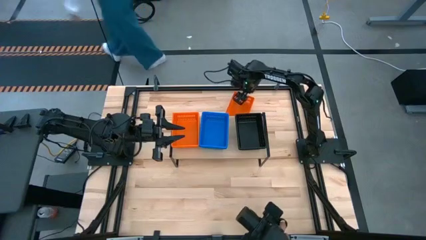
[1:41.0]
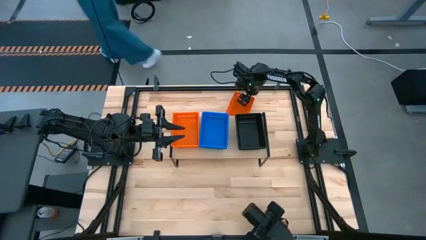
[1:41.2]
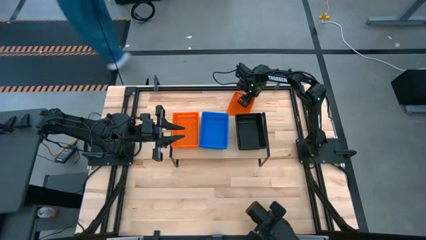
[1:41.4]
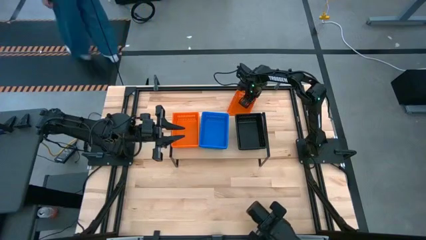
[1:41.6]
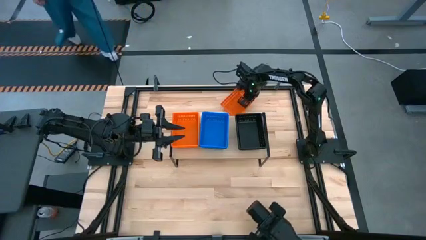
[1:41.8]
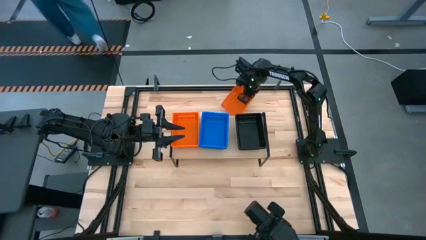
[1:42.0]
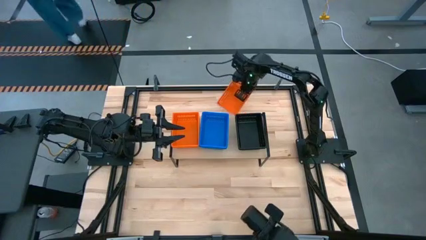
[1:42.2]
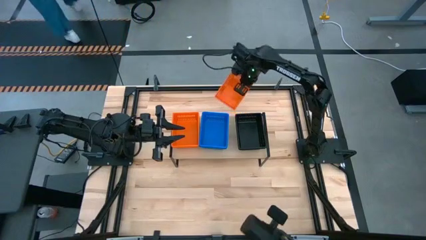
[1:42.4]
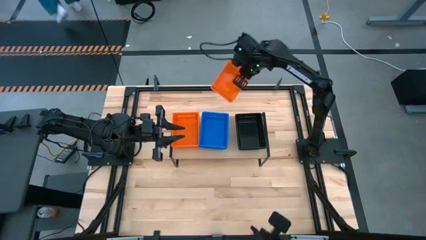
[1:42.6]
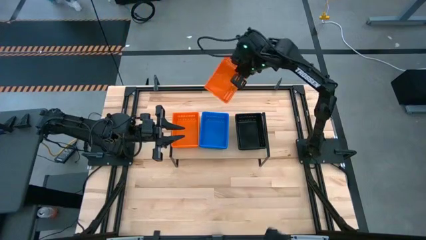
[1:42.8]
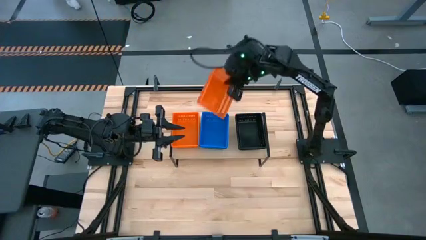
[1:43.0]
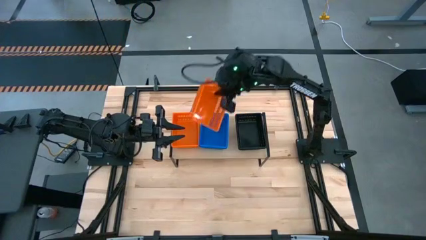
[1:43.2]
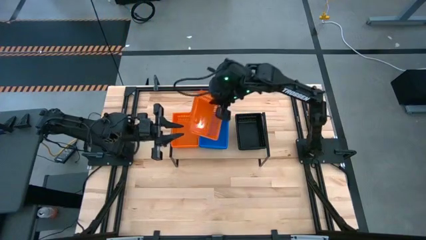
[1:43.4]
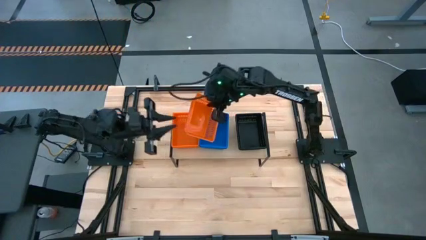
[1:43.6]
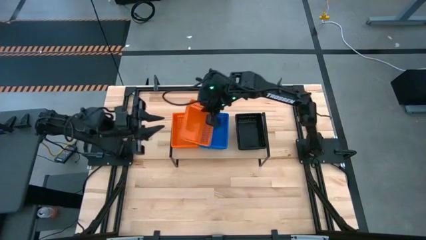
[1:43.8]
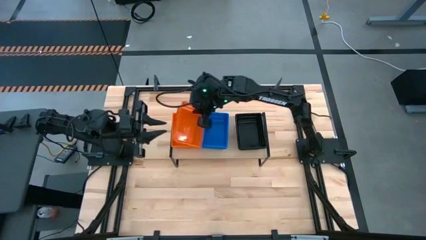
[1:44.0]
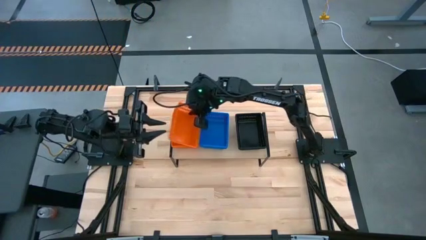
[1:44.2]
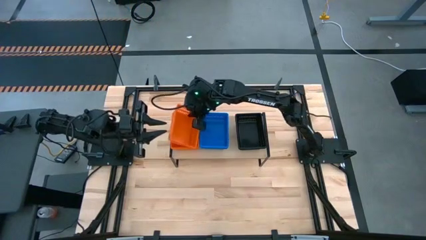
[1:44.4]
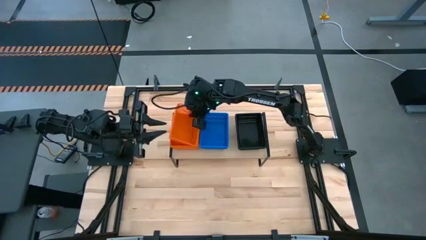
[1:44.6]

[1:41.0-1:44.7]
Task: Stack baskets on shelf by color
Stack the orange bin on top of the orange bin on the shelf

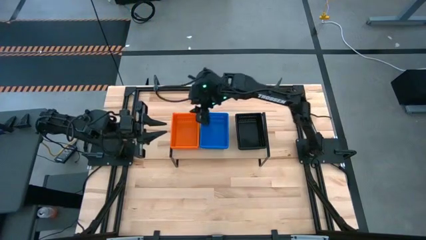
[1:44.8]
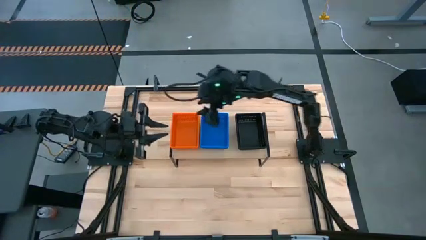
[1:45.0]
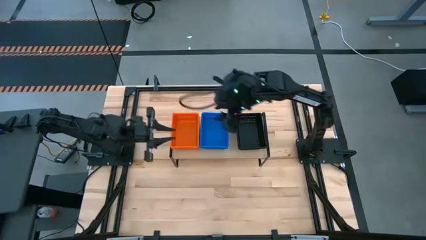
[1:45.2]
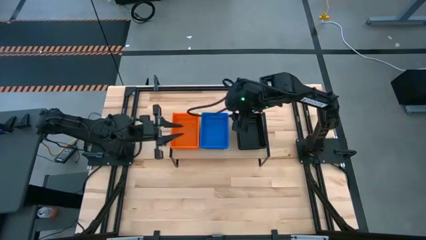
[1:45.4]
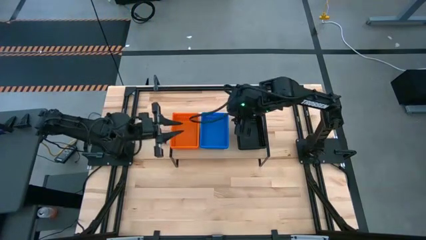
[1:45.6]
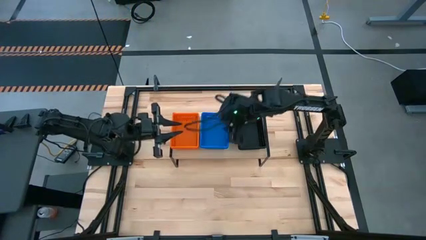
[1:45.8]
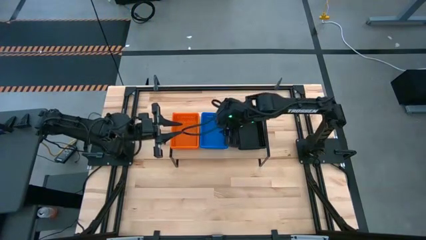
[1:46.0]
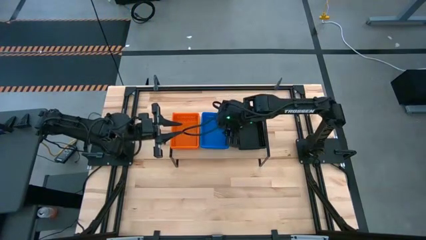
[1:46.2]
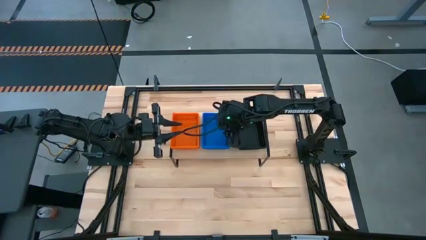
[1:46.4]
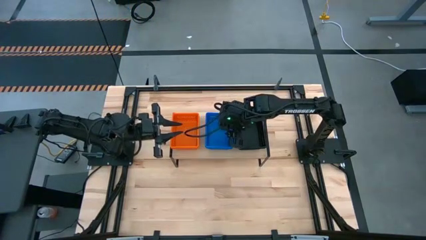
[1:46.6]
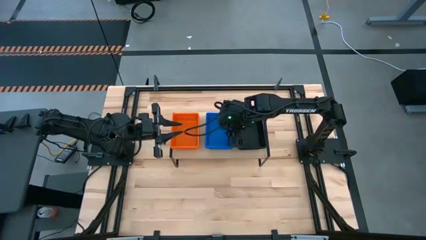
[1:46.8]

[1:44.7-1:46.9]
Adjust the stacked blue bins on the shelf

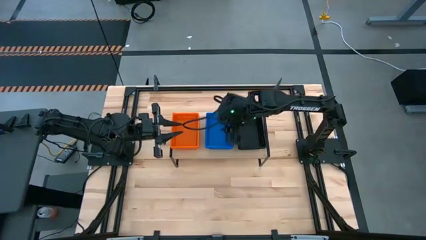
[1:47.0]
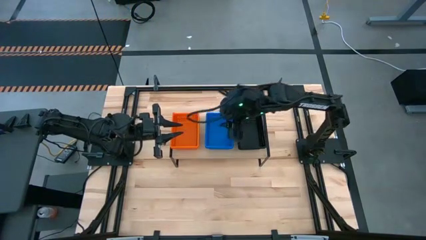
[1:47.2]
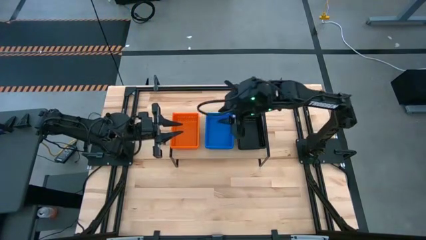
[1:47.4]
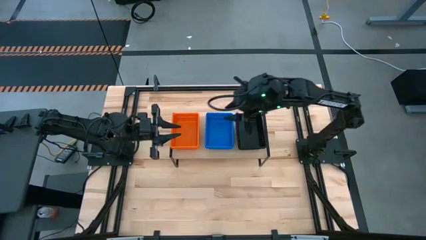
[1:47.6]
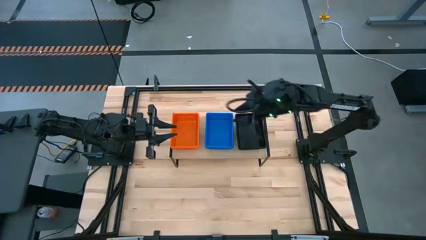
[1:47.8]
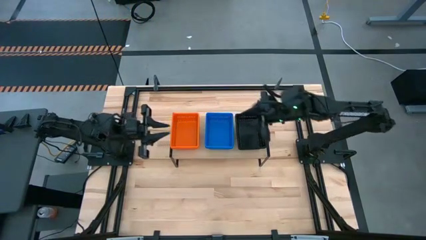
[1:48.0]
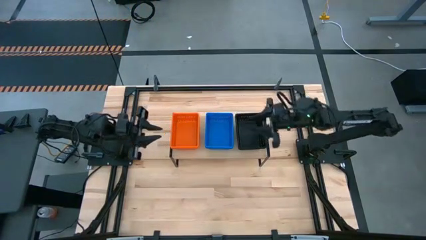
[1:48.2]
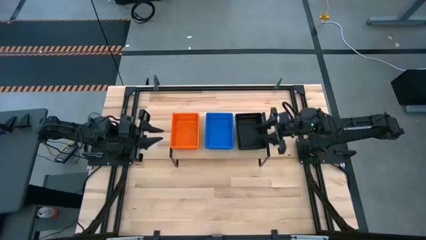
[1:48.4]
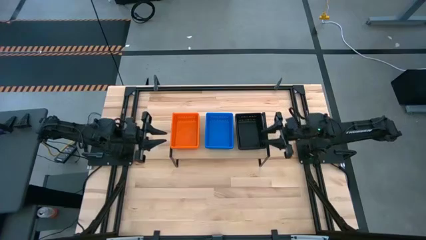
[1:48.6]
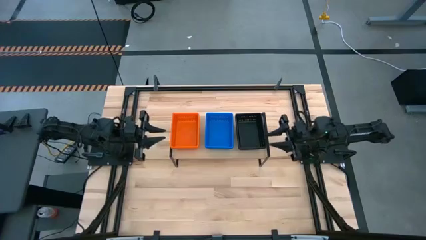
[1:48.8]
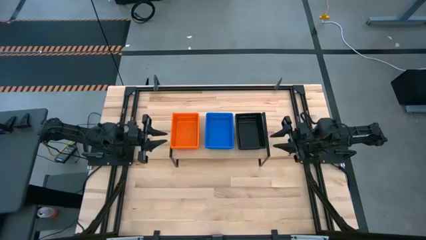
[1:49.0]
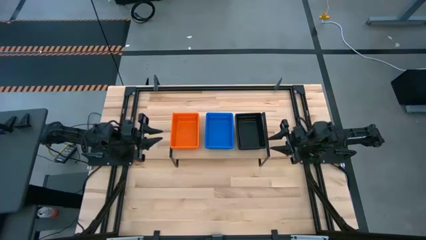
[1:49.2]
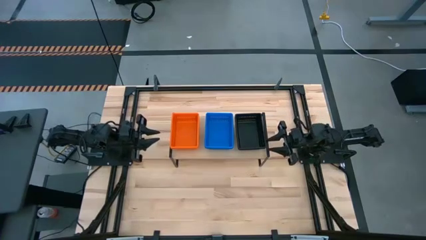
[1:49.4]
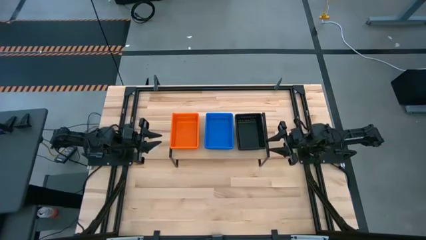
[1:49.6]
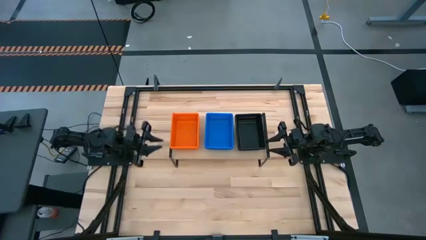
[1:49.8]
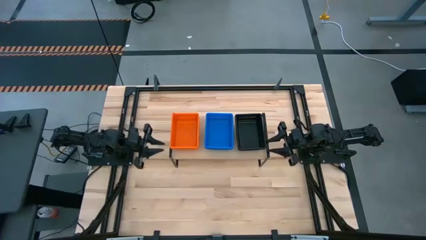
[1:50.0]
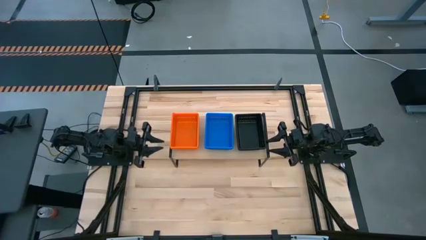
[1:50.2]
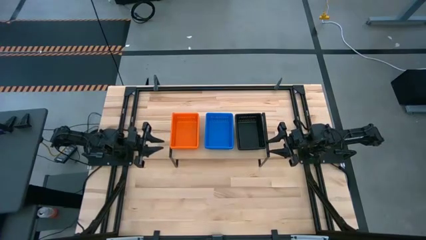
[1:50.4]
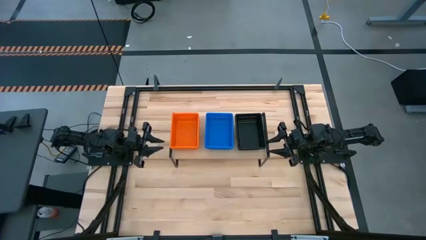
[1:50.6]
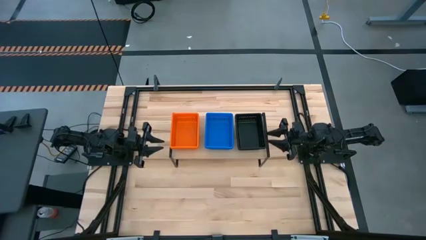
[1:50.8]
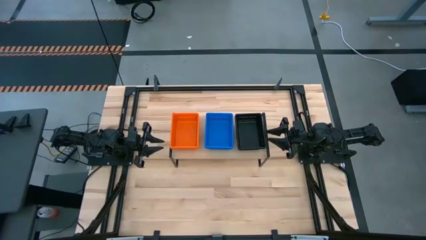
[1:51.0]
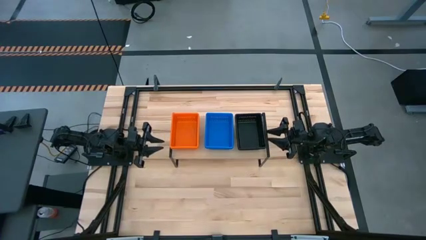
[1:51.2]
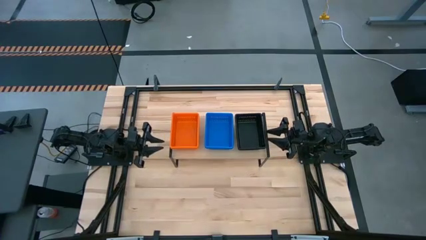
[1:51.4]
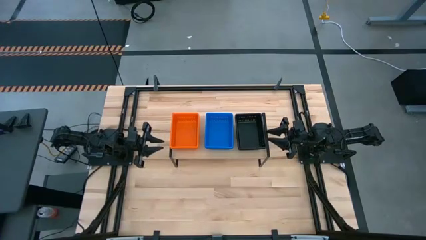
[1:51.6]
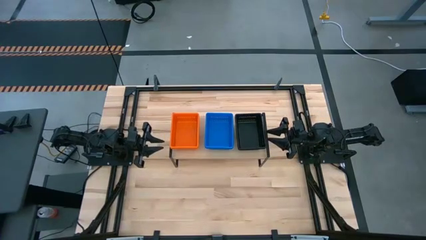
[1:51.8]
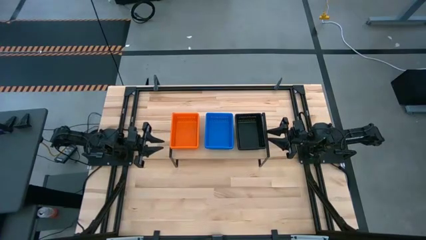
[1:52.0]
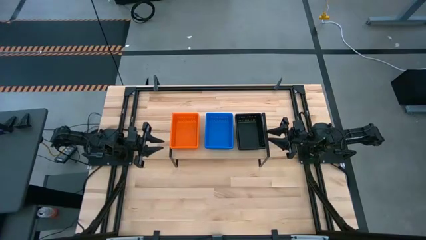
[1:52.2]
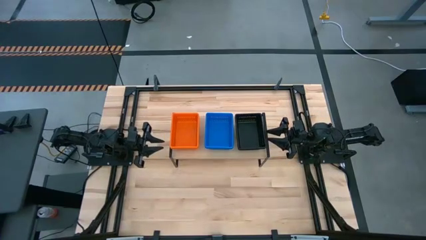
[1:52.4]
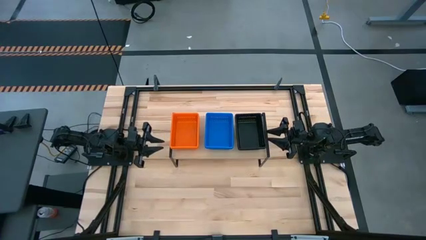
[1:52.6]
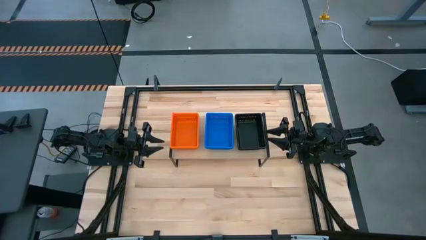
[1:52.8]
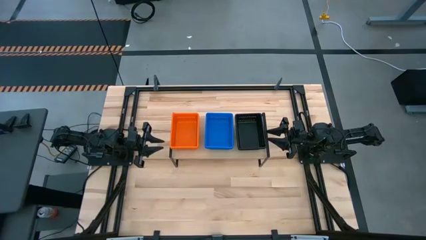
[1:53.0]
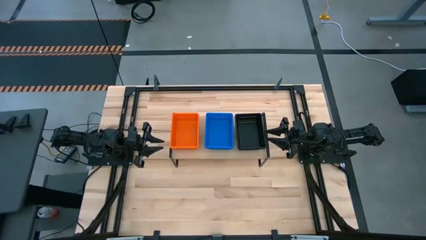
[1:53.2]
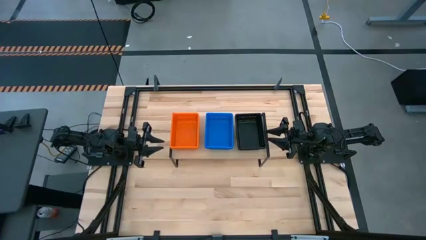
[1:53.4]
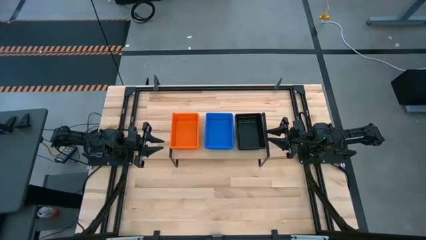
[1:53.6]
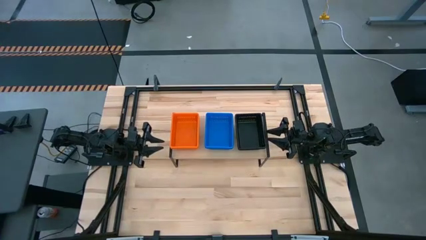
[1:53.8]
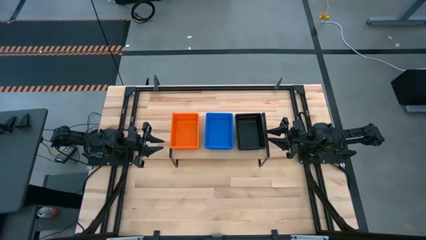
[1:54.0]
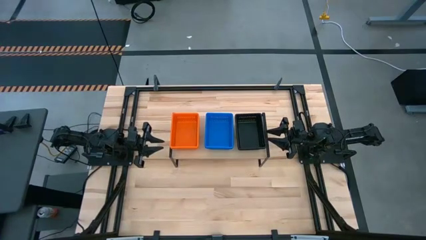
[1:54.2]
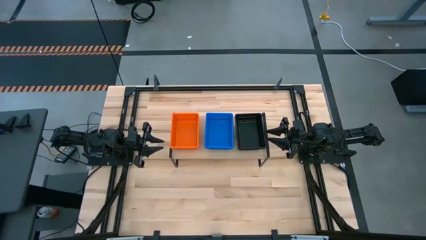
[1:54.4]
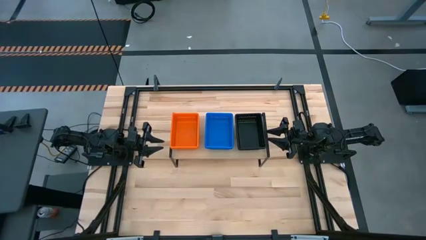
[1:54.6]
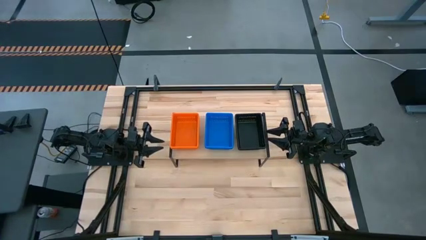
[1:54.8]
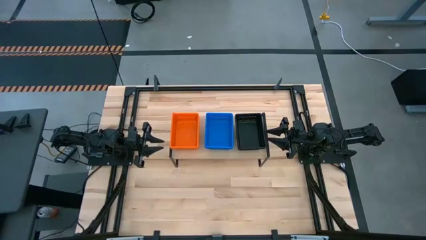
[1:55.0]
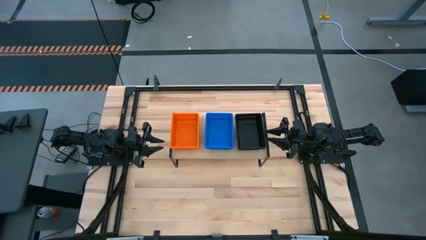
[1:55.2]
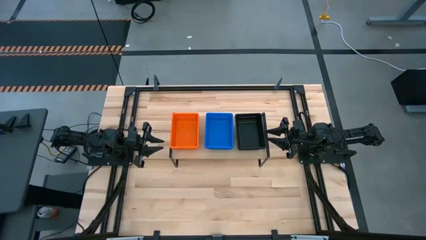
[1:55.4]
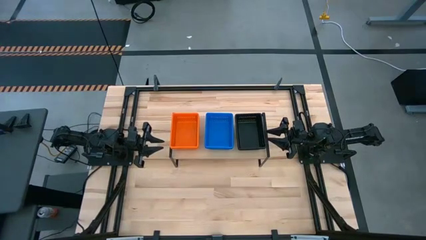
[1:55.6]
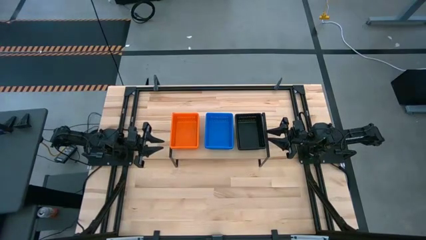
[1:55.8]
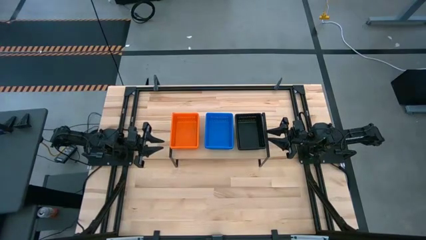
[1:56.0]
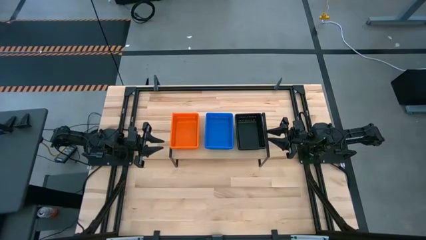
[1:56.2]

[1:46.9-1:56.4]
Return to Home Position
